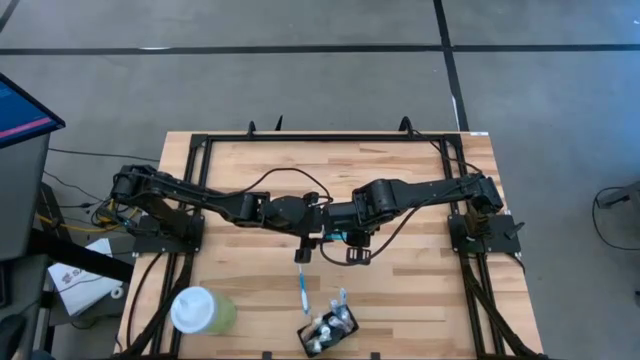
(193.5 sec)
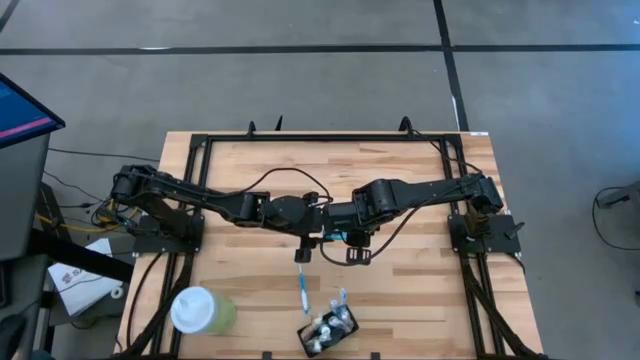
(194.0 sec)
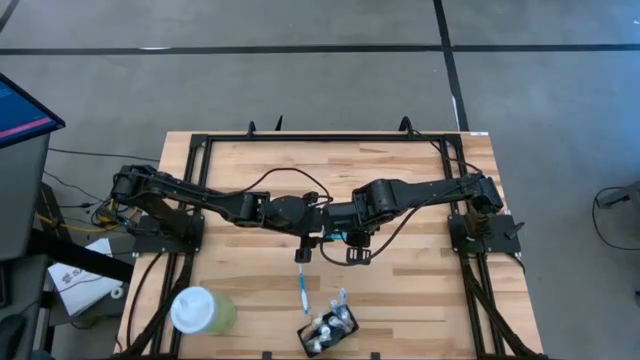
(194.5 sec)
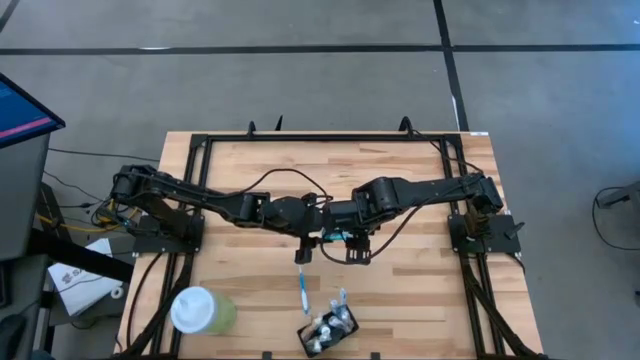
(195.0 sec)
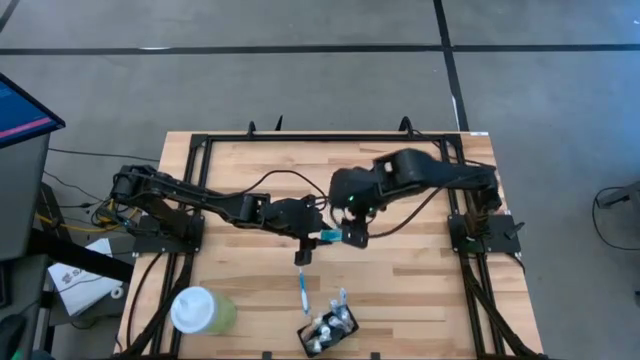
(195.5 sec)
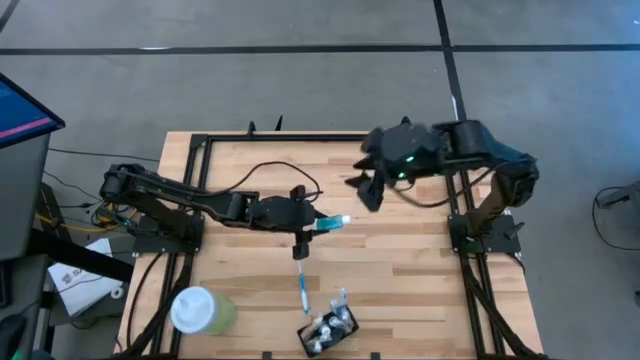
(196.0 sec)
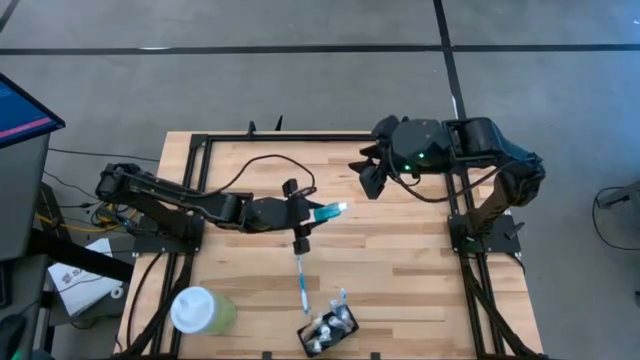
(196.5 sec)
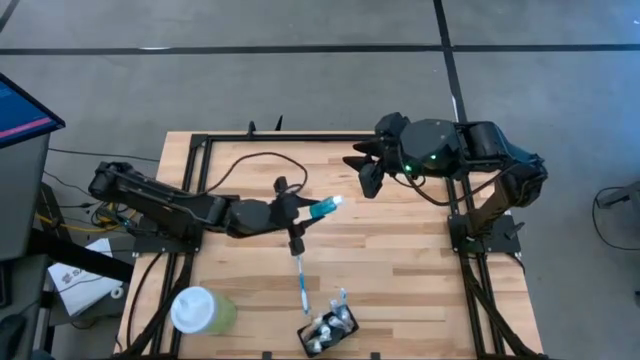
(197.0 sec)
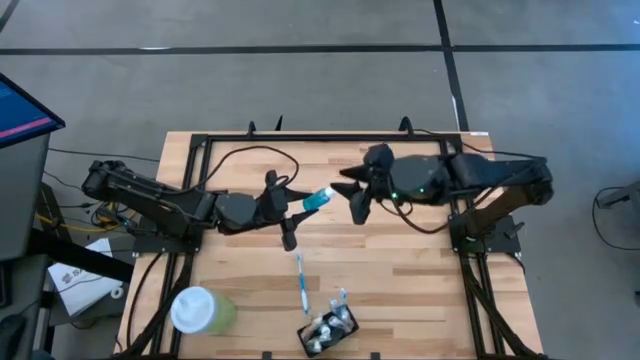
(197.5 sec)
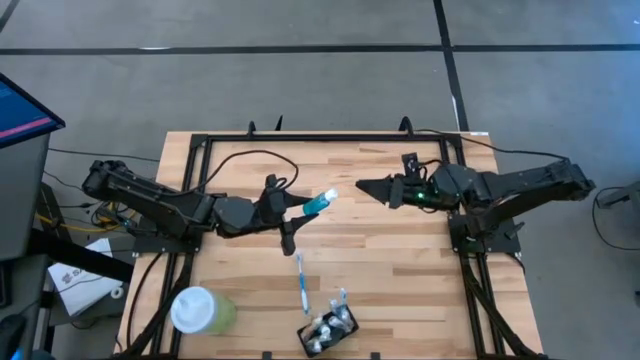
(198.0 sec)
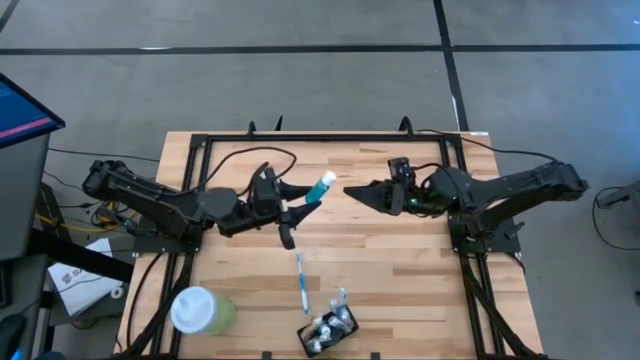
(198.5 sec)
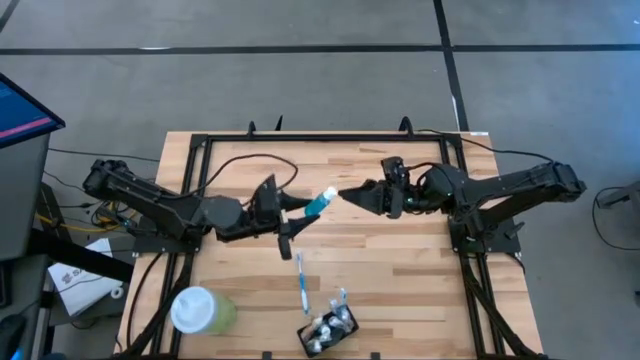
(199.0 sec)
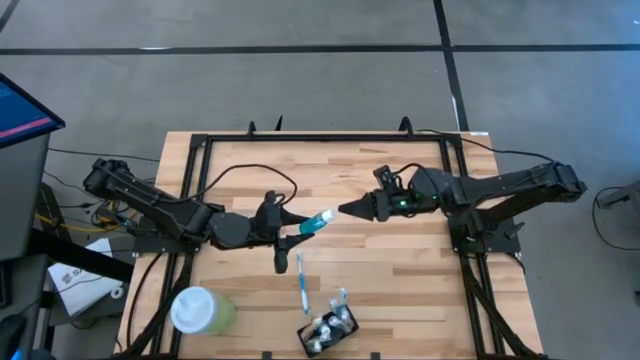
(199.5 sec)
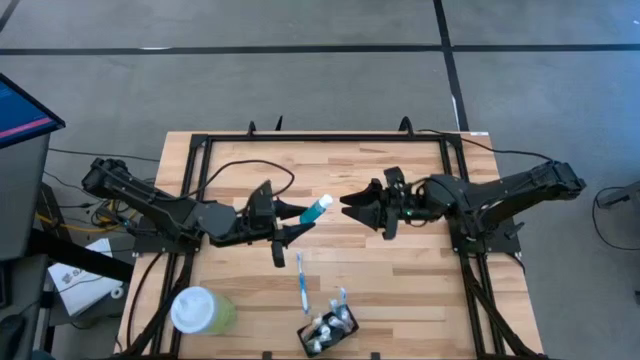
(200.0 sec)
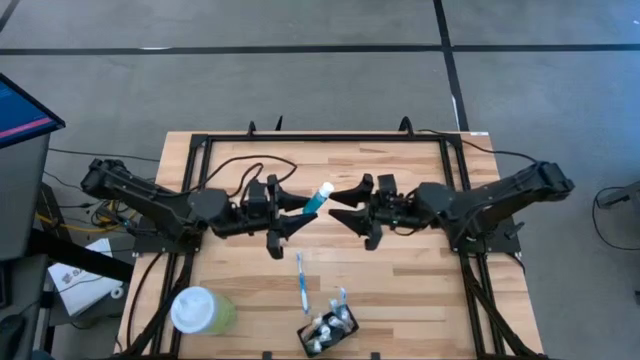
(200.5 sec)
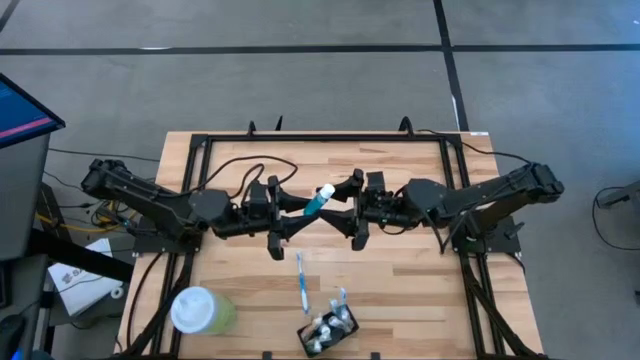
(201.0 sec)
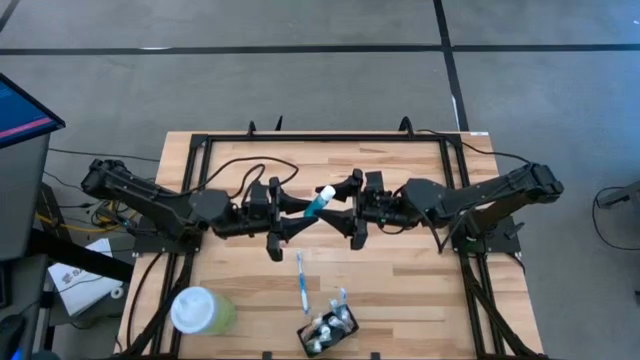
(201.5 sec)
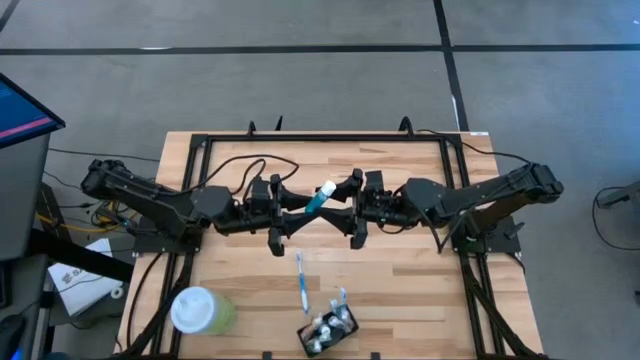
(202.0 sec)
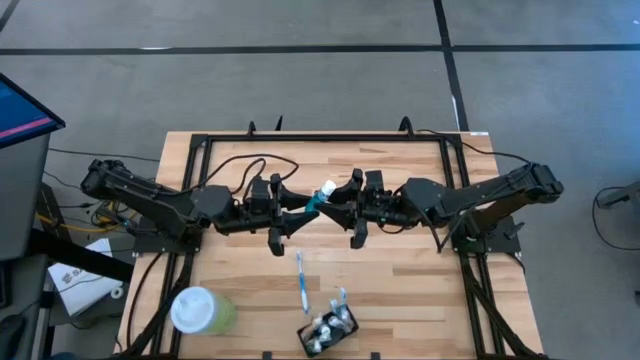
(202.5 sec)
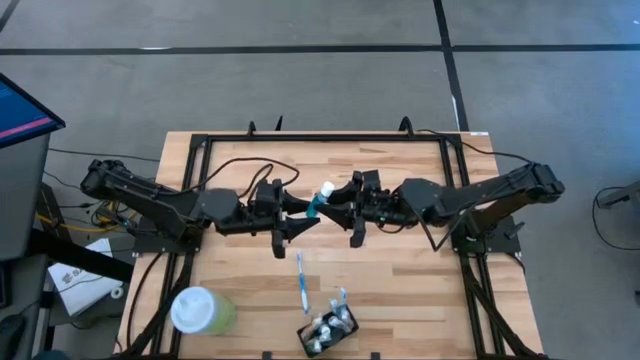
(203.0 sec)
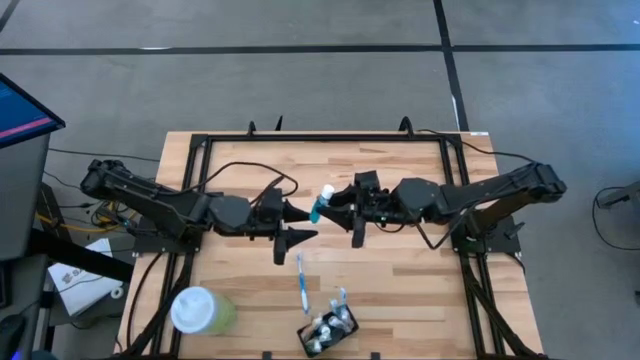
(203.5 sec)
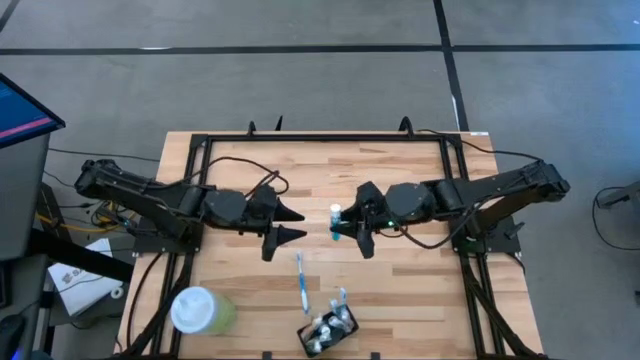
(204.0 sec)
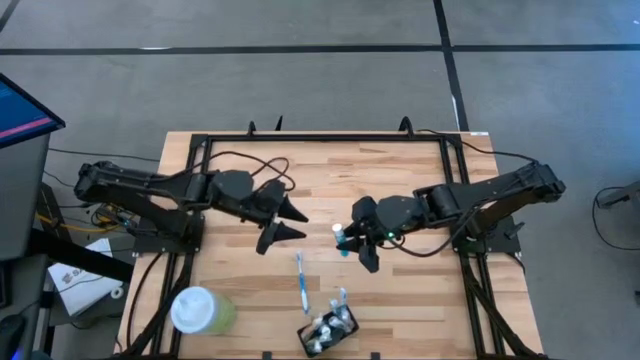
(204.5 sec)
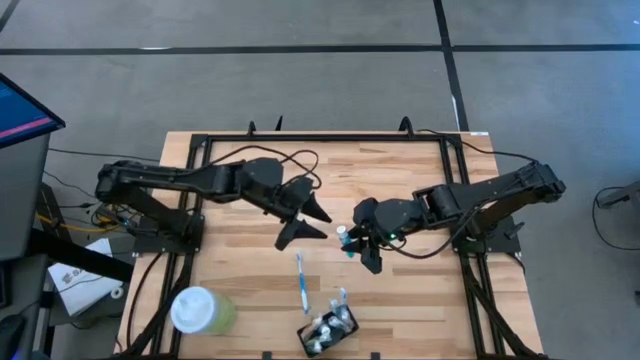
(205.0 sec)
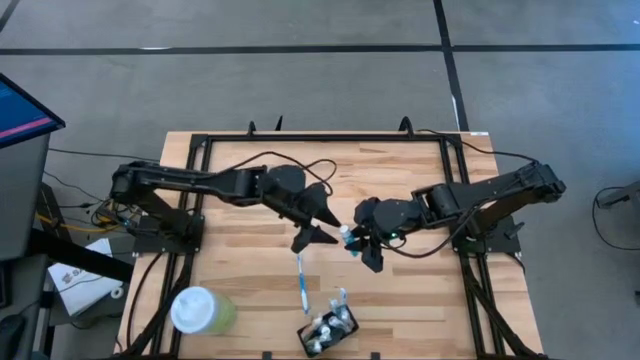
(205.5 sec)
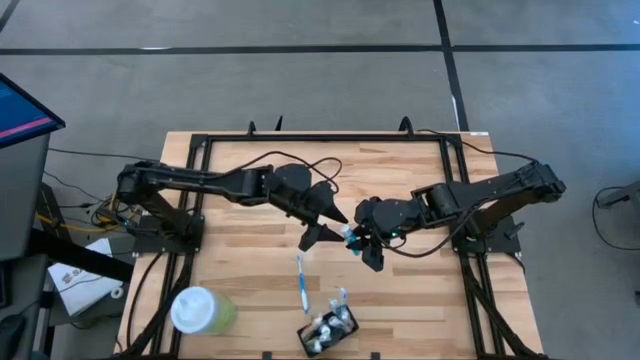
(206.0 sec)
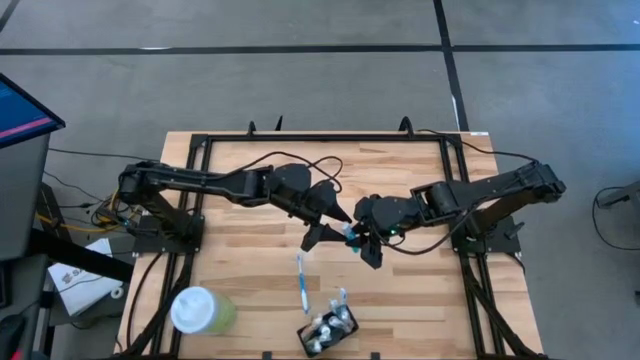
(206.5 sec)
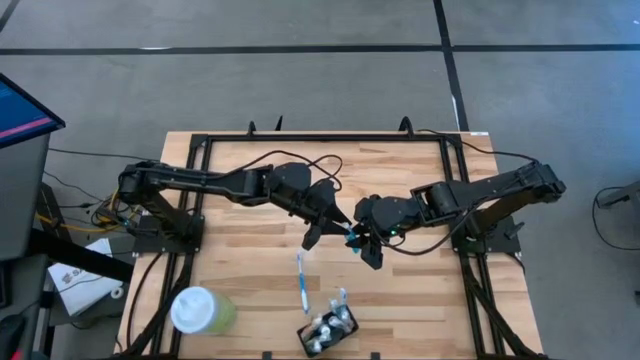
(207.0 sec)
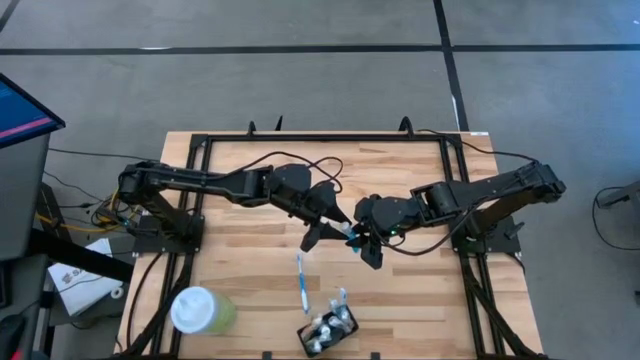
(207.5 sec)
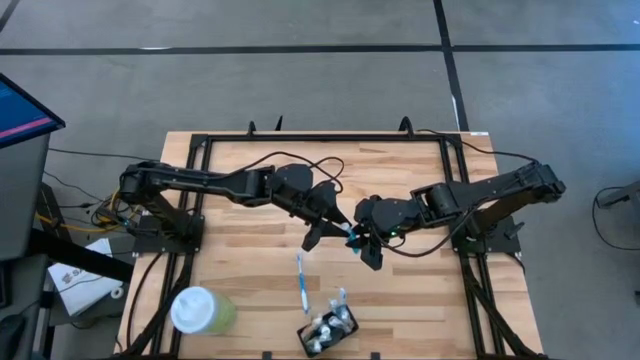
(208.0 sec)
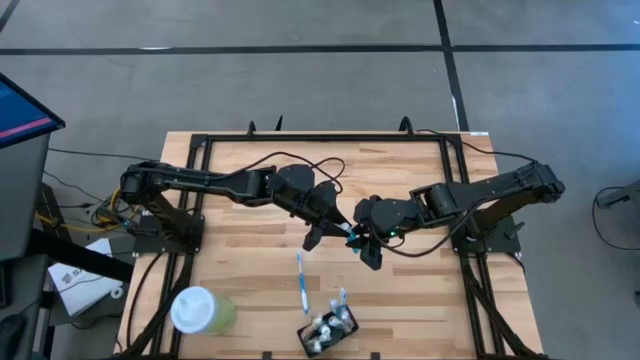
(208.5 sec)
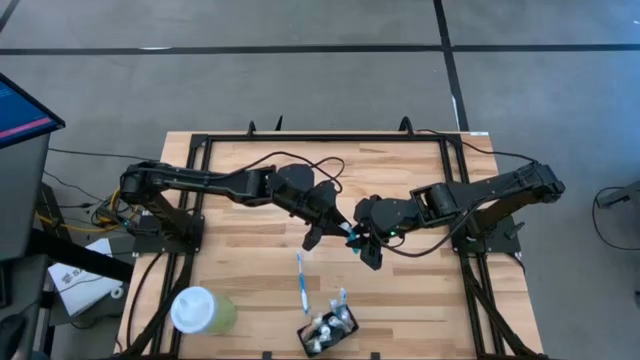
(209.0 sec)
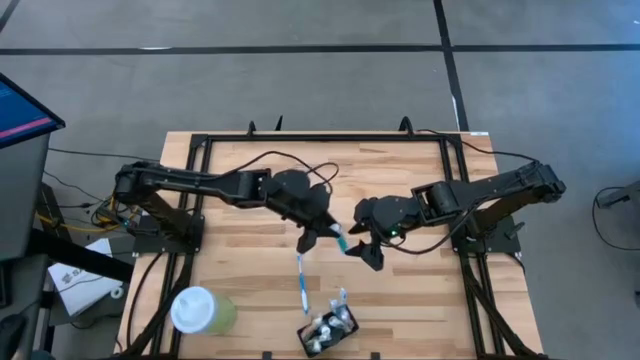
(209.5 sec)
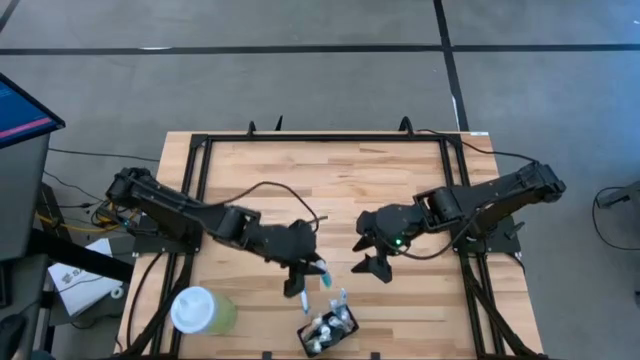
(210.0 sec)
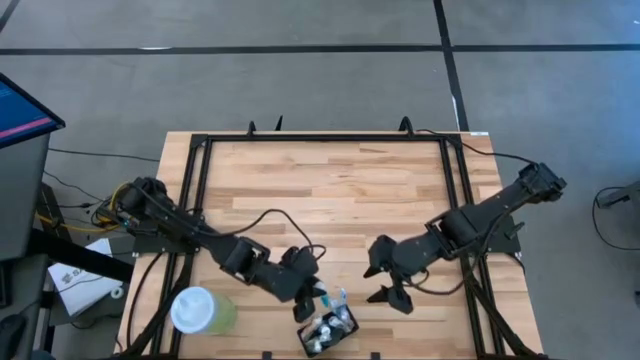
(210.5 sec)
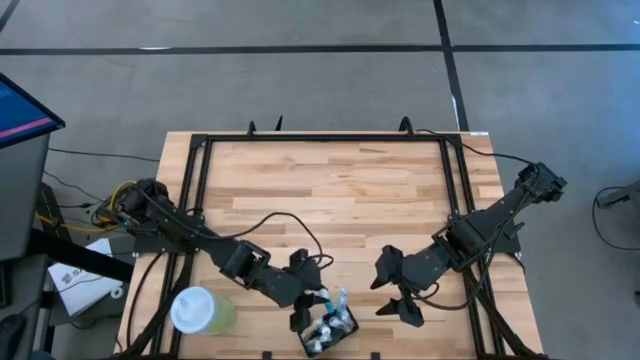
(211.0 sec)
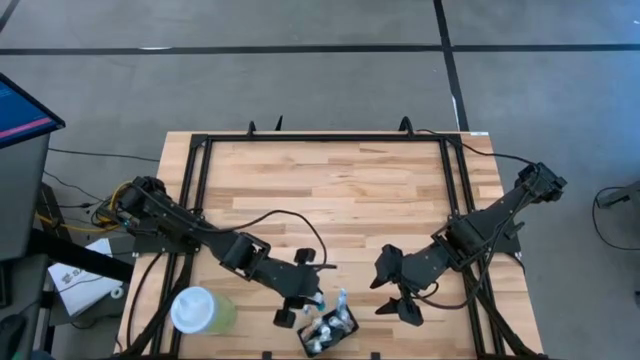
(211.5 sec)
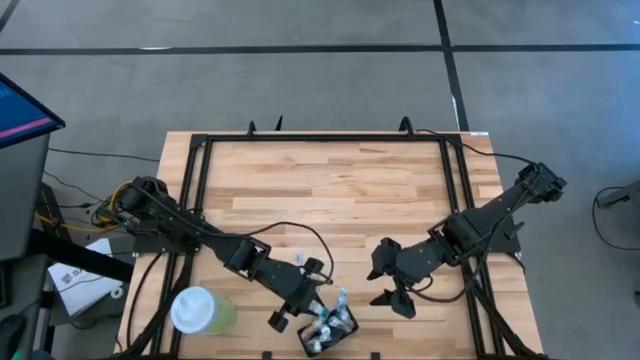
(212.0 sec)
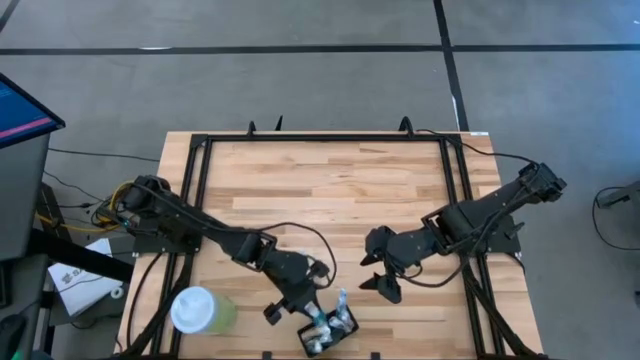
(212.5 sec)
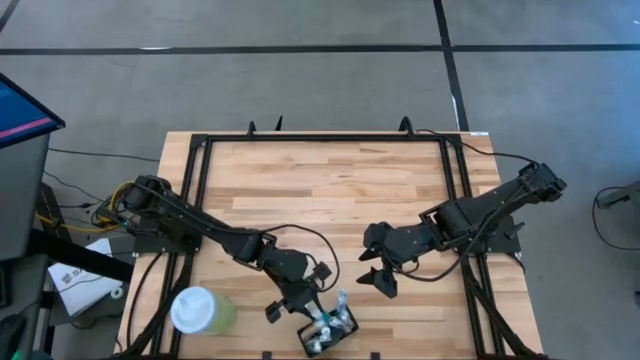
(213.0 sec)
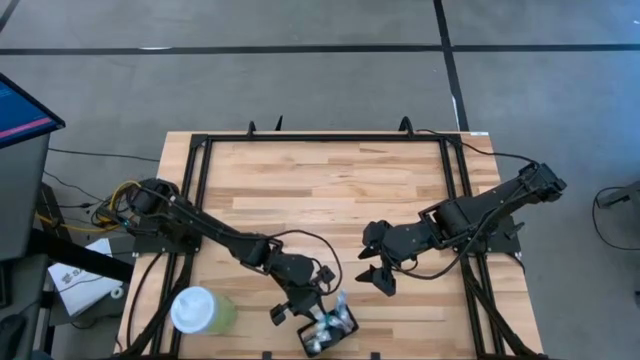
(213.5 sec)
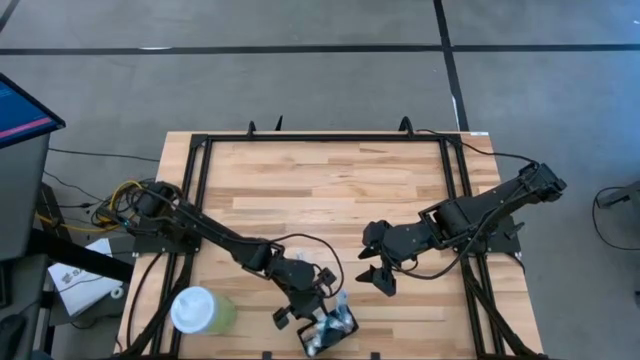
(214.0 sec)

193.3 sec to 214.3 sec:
Task: Pick & Place toothbrushing station
Put the blue mouthwash into the black wire organizer
